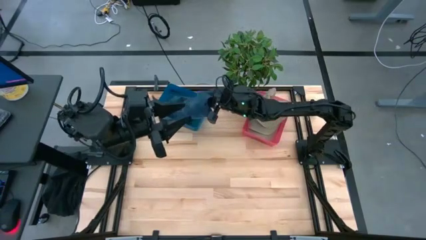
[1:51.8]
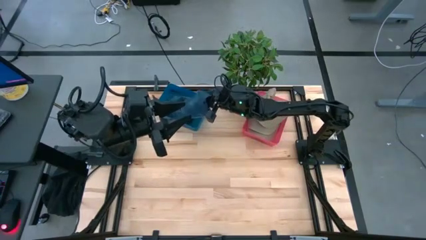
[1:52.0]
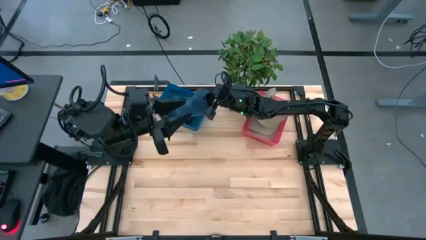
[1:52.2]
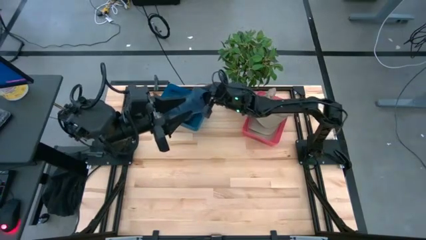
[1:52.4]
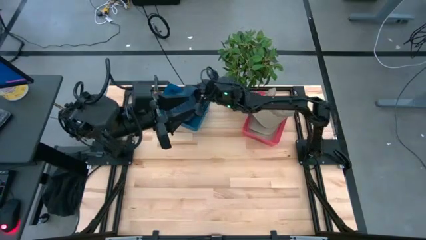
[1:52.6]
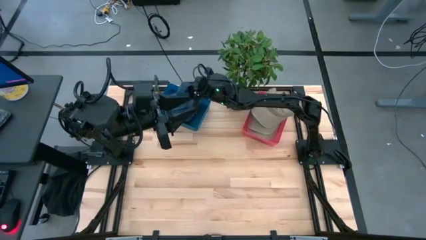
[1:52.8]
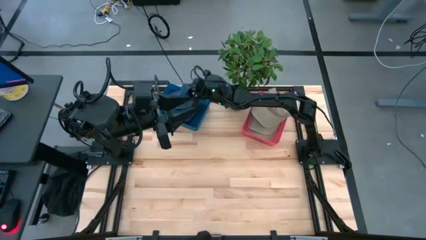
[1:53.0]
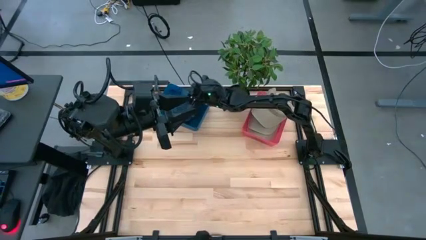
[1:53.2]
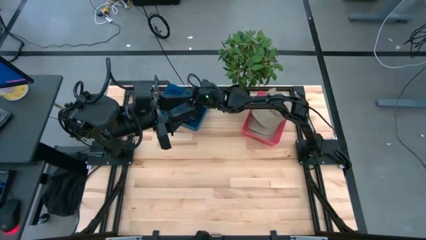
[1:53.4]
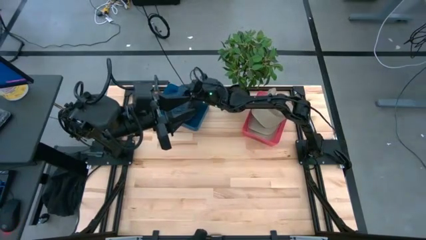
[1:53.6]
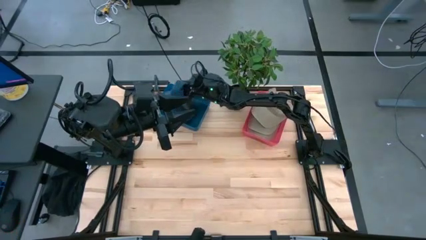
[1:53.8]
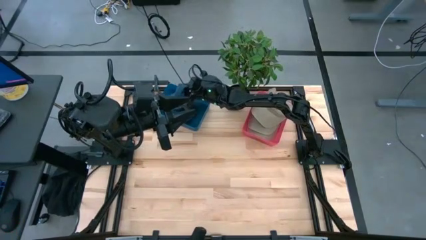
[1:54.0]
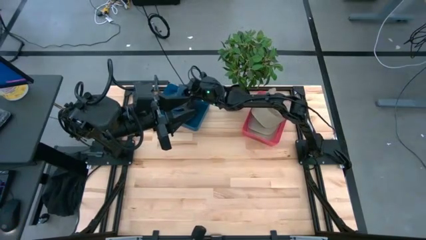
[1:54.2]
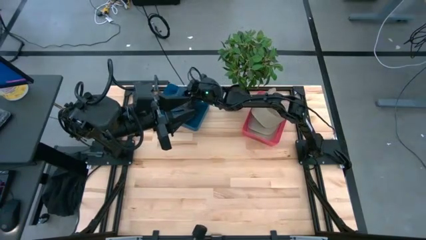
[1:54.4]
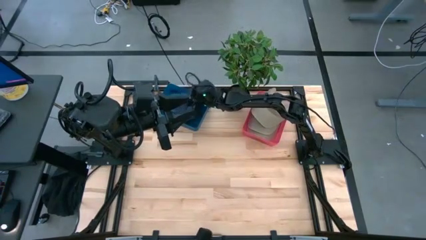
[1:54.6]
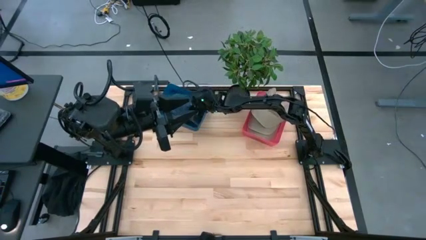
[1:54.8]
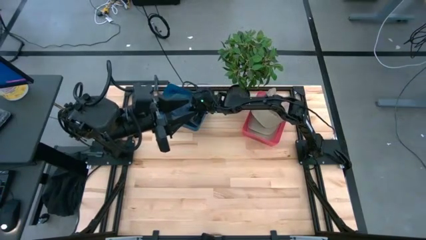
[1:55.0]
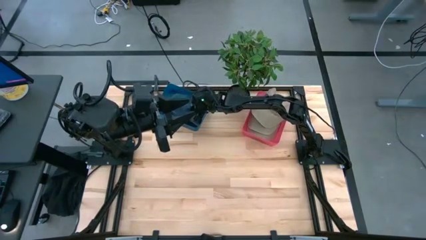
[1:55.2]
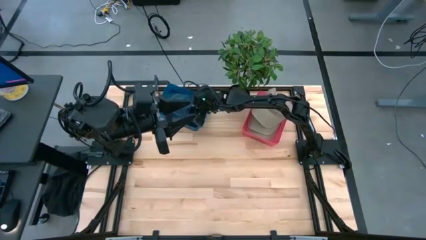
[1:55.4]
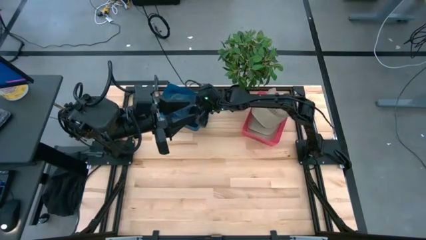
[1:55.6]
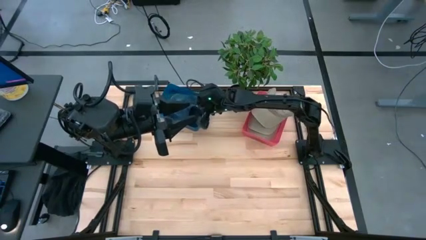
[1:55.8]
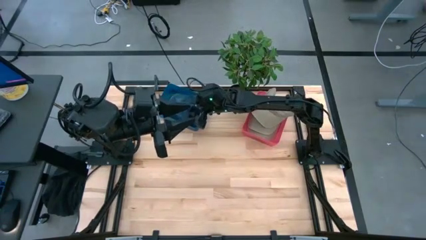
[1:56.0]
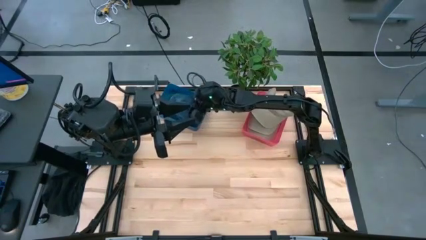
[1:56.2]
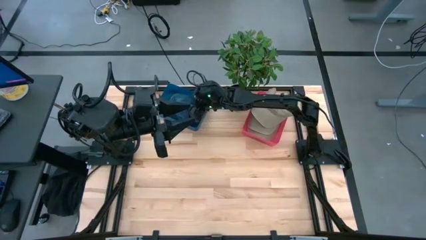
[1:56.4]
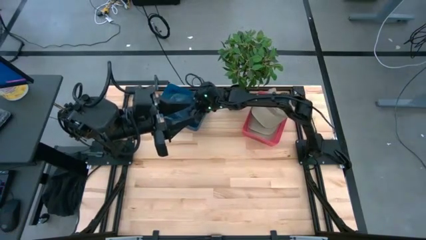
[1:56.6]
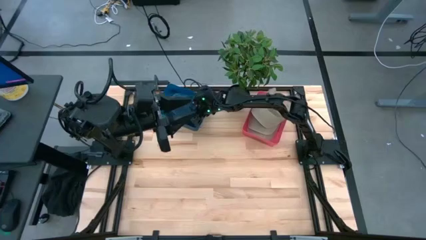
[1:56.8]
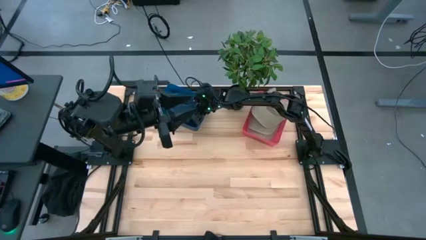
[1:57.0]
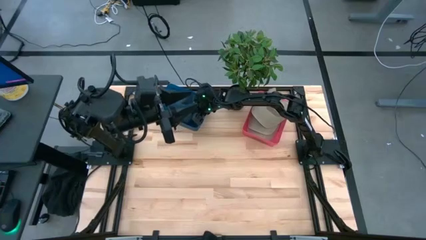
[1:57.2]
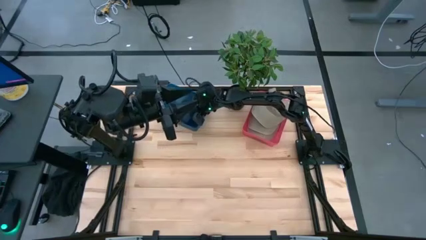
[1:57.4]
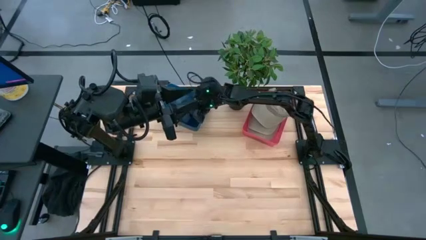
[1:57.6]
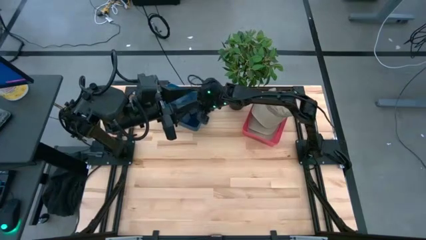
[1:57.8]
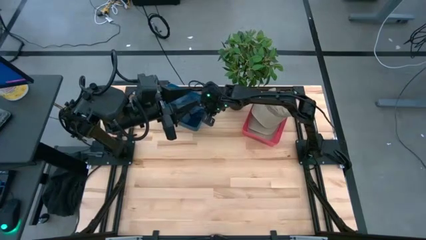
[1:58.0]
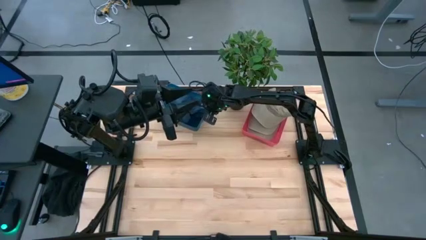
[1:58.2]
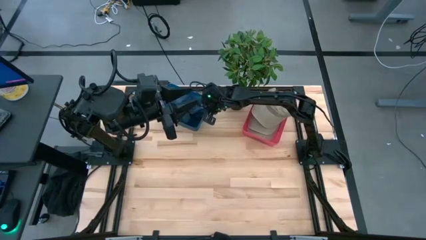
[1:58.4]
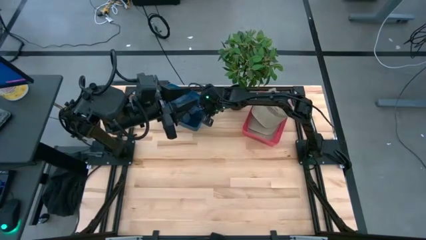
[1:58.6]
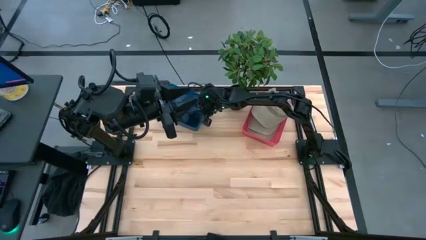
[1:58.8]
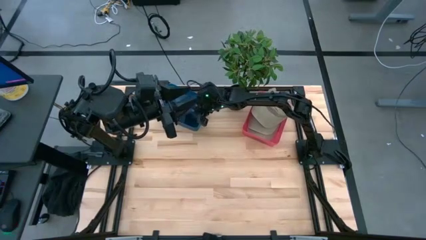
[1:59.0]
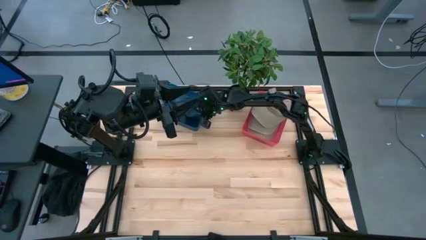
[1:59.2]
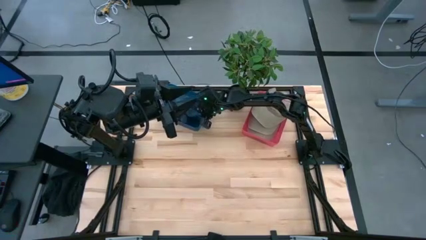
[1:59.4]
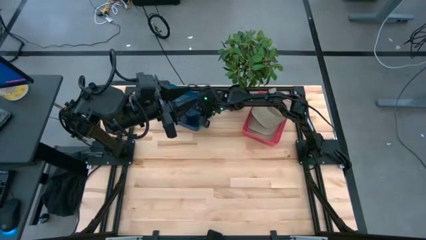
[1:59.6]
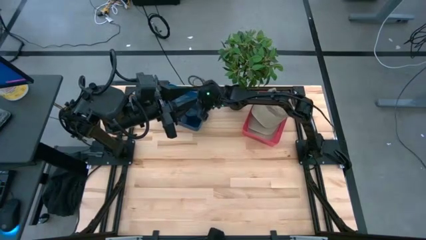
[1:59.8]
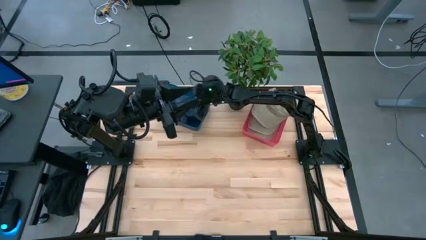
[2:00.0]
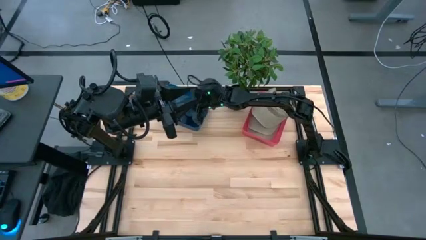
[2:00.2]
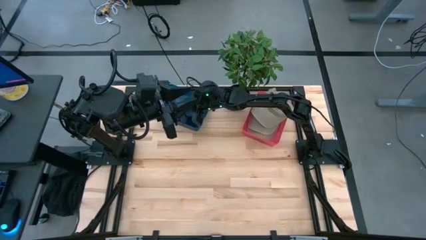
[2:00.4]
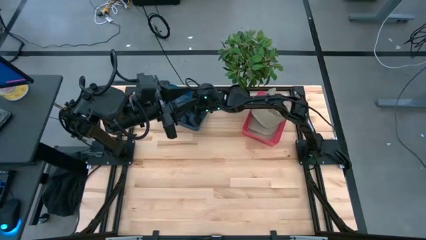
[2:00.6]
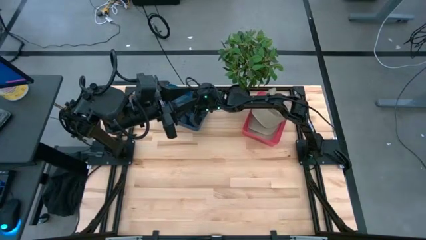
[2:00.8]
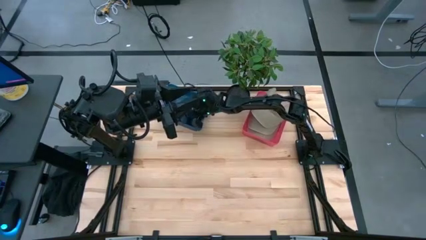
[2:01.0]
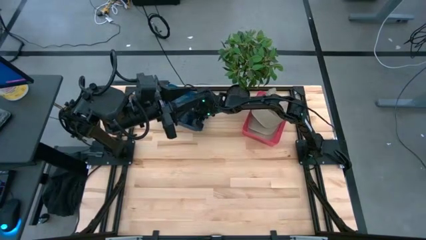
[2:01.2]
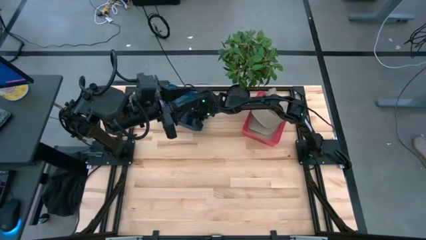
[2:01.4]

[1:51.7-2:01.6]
Task: Pick & Place hat
Put the blue cap into the blue bin

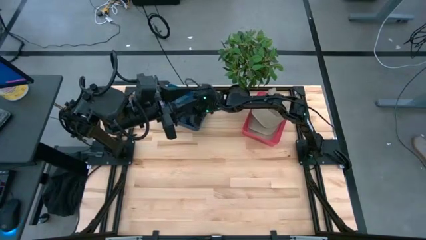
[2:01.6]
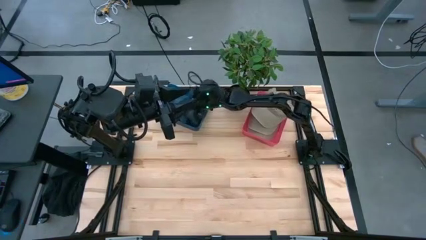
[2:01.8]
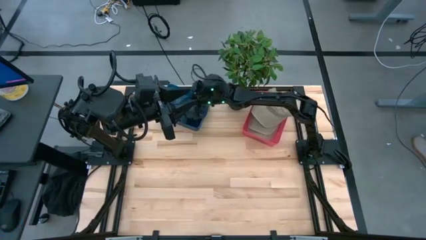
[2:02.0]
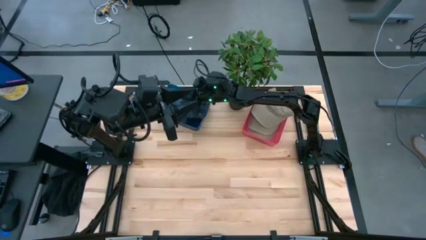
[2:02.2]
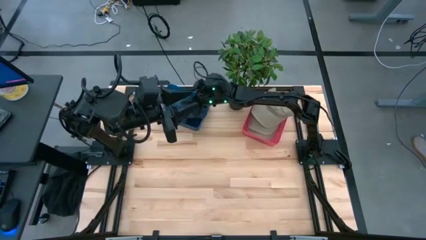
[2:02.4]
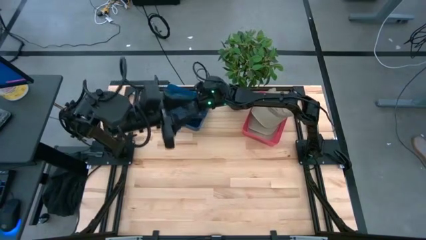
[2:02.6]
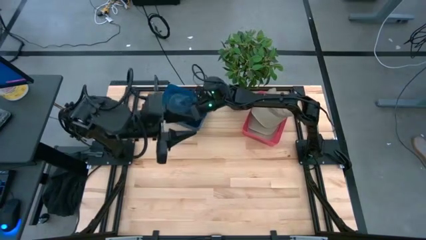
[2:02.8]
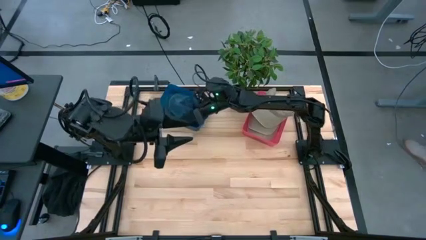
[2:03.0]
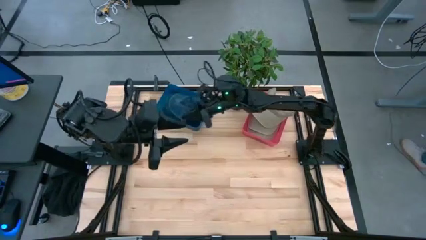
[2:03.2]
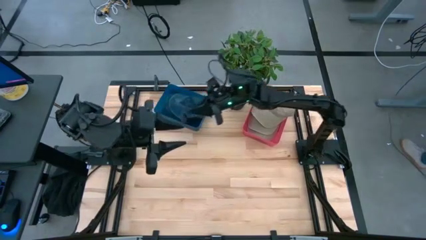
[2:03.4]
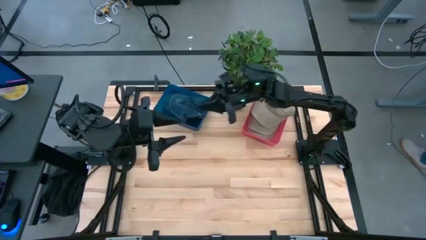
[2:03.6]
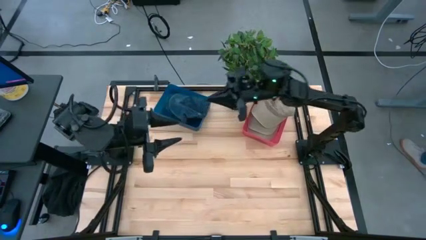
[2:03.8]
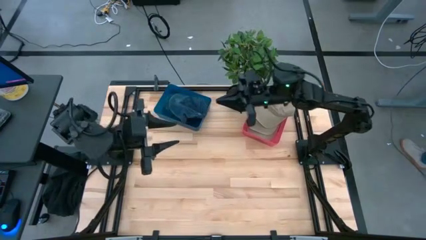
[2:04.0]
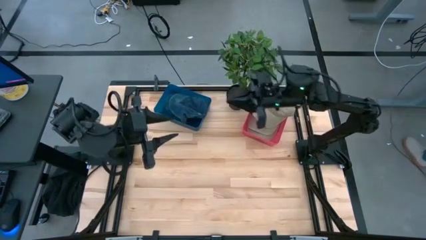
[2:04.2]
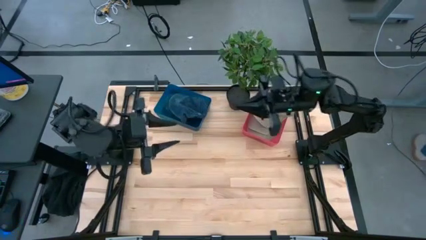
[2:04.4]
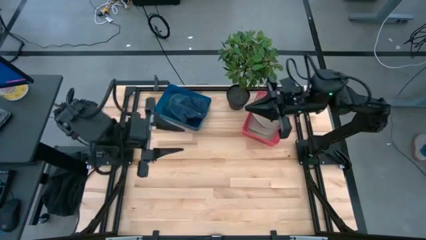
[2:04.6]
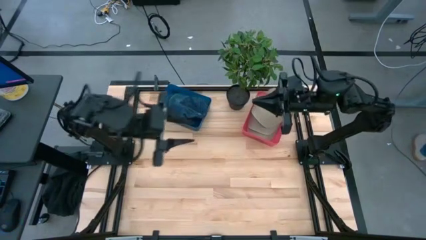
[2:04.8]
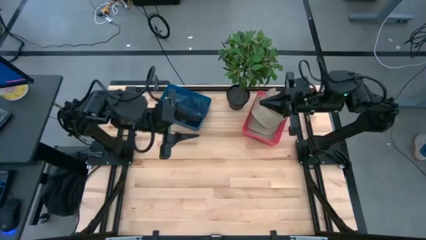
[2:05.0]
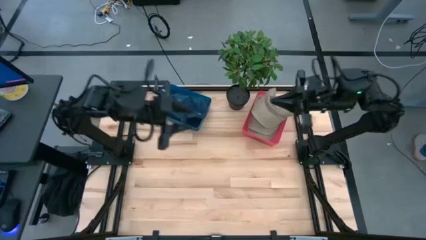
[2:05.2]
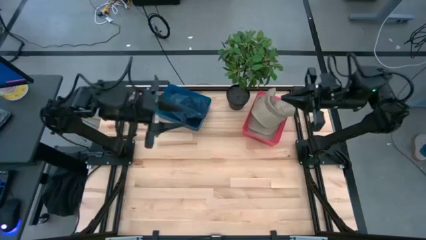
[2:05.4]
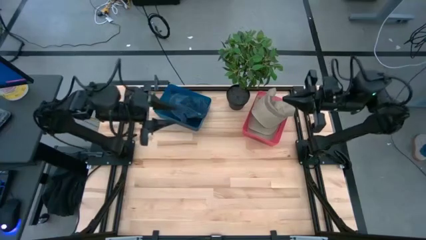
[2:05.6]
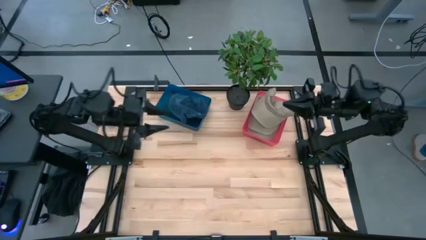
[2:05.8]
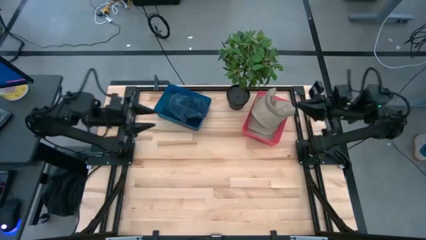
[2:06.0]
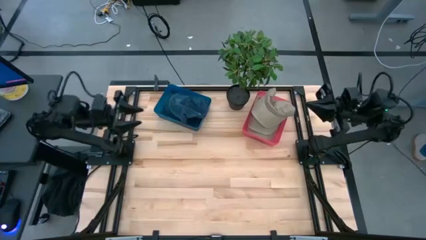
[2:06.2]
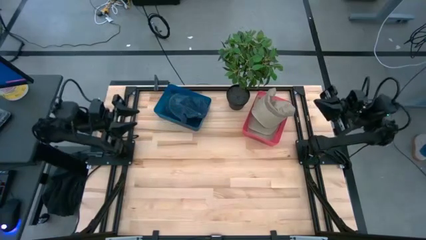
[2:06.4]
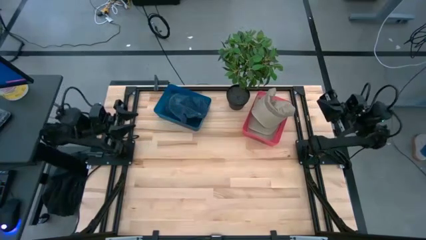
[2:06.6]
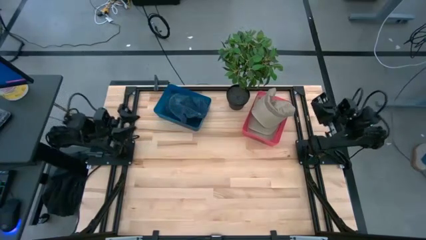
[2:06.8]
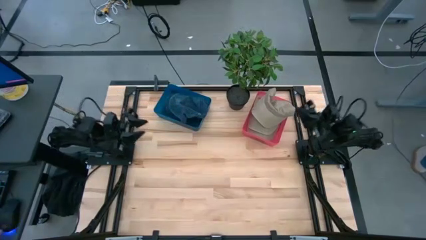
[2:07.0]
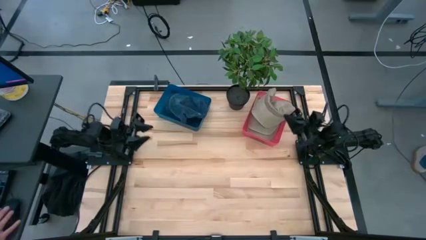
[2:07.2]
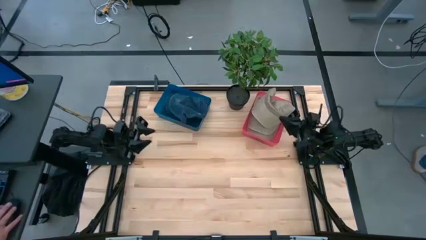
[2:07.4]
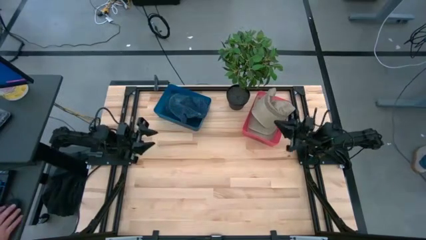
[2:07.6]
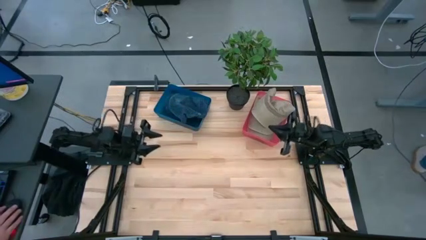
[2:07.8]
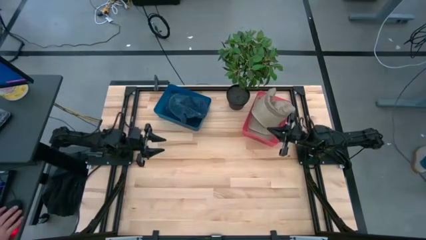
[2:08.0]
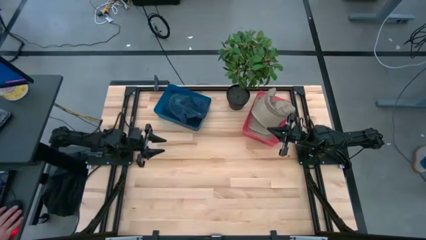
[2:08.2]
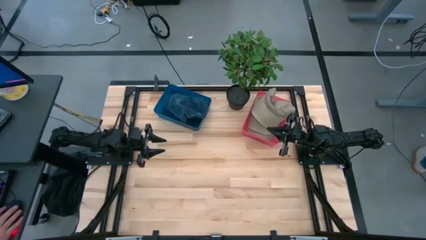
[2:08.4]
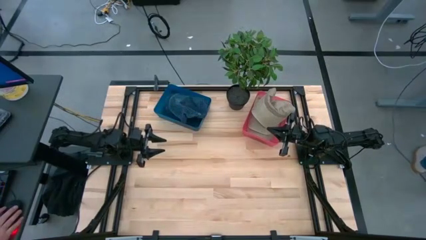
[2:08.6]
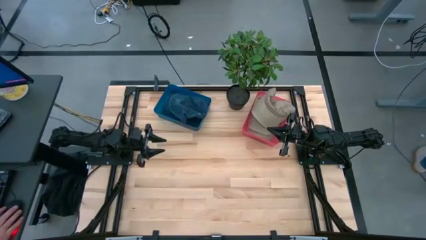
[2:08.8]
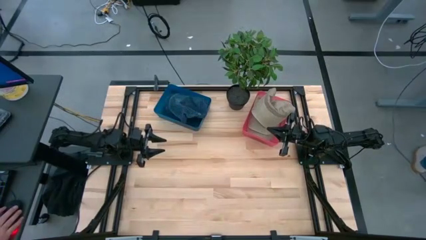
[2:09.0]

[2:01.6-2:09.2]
Return to Home Position
